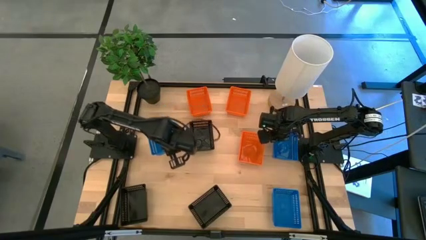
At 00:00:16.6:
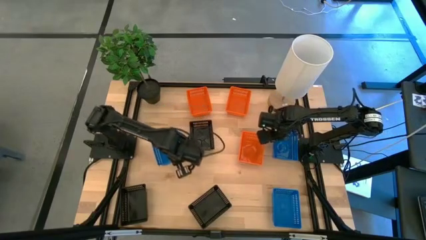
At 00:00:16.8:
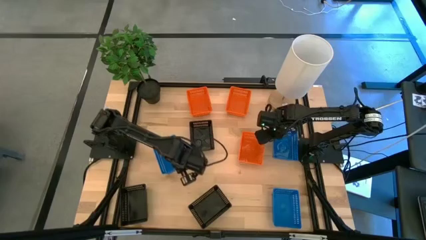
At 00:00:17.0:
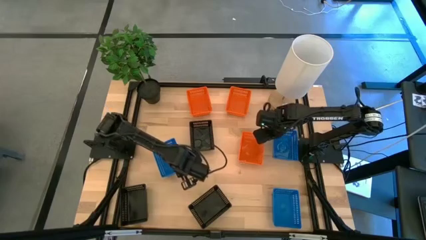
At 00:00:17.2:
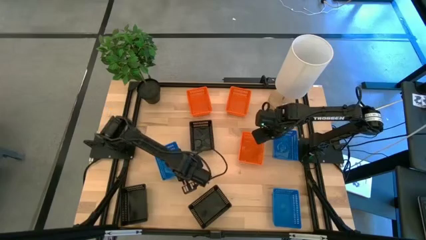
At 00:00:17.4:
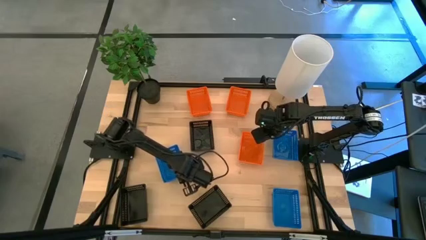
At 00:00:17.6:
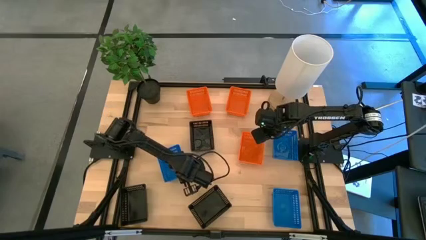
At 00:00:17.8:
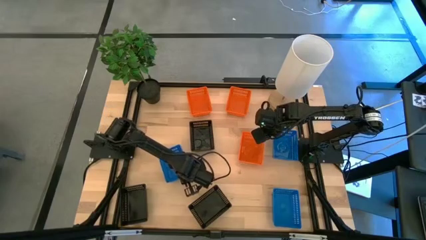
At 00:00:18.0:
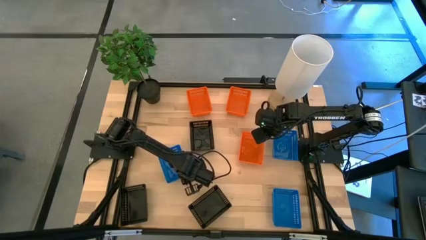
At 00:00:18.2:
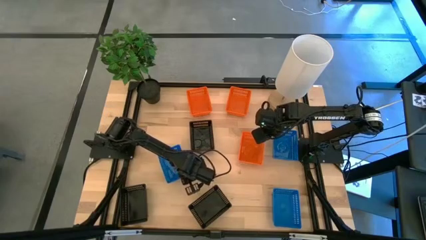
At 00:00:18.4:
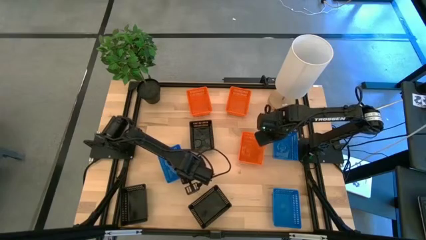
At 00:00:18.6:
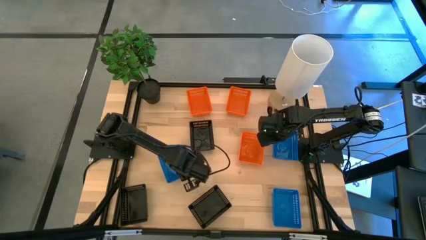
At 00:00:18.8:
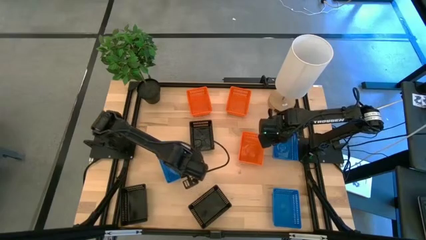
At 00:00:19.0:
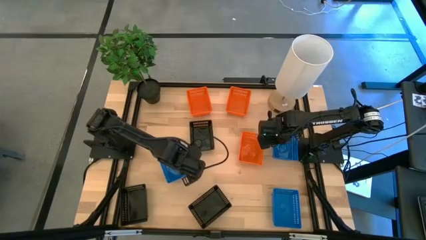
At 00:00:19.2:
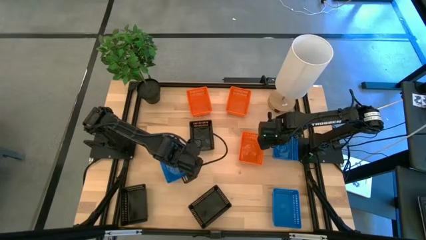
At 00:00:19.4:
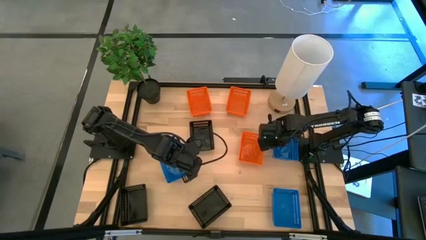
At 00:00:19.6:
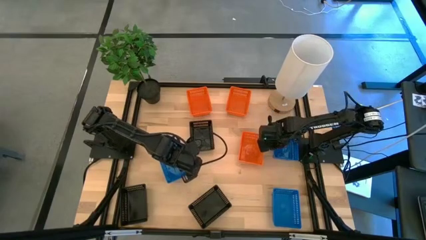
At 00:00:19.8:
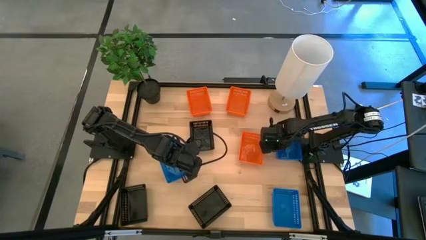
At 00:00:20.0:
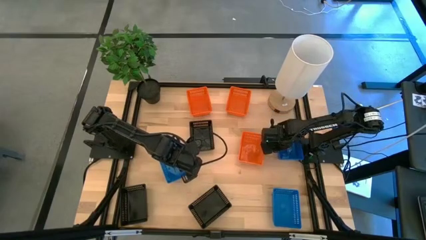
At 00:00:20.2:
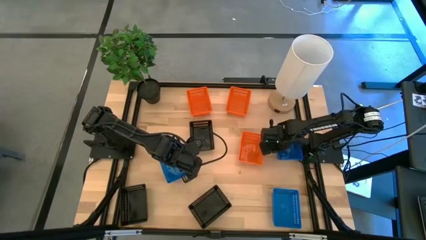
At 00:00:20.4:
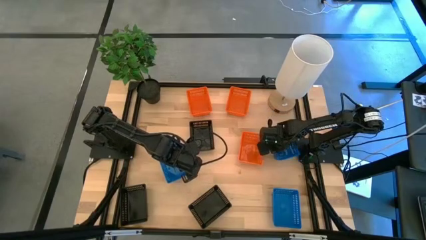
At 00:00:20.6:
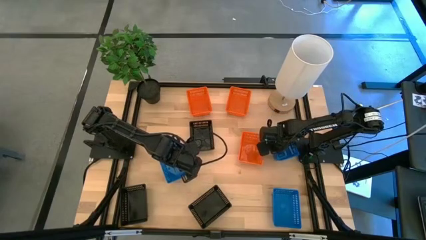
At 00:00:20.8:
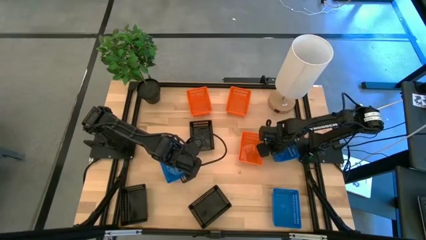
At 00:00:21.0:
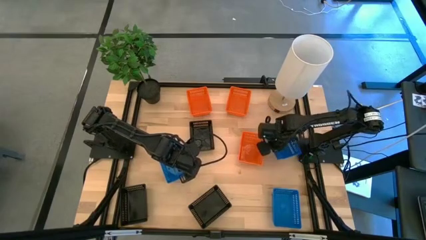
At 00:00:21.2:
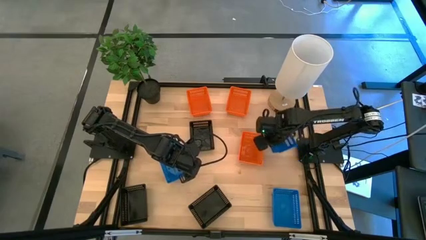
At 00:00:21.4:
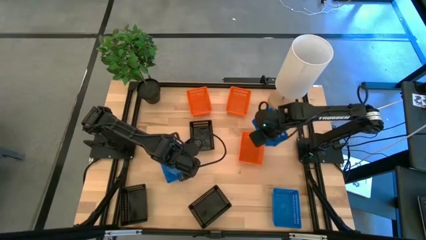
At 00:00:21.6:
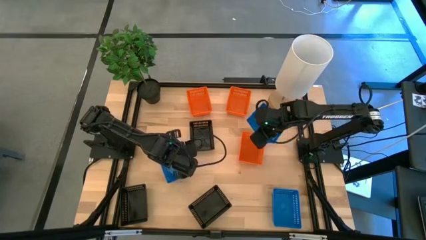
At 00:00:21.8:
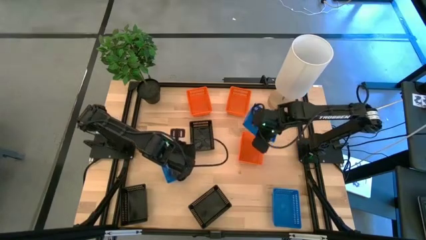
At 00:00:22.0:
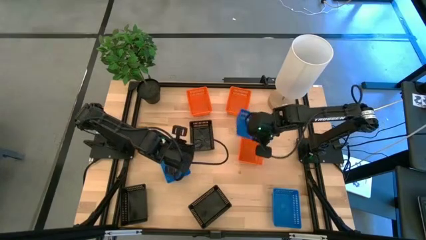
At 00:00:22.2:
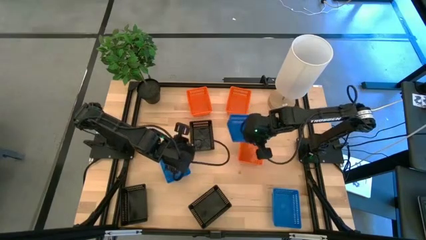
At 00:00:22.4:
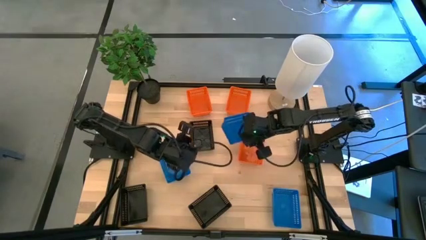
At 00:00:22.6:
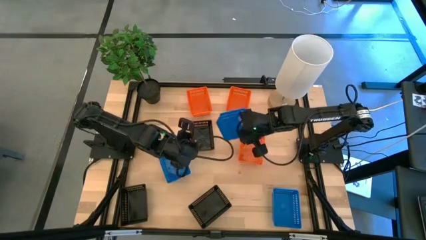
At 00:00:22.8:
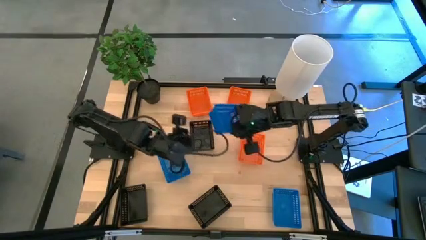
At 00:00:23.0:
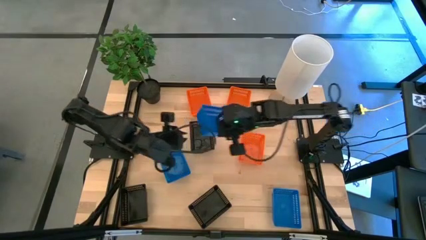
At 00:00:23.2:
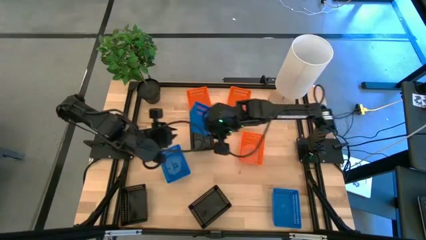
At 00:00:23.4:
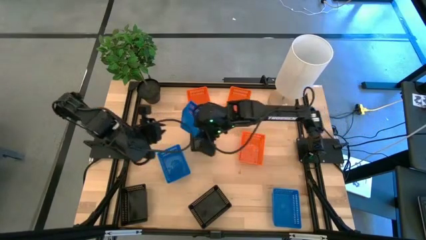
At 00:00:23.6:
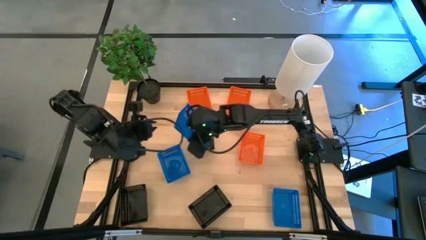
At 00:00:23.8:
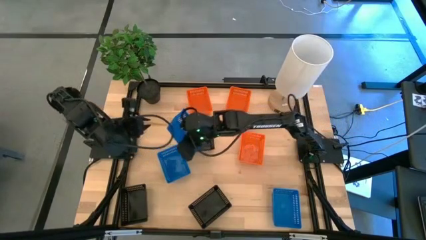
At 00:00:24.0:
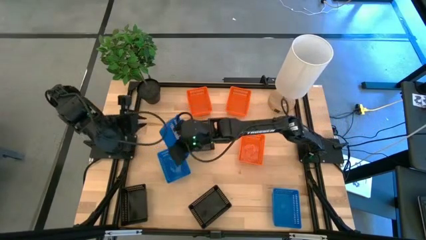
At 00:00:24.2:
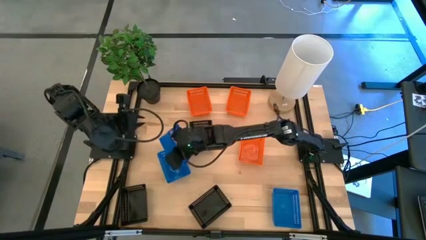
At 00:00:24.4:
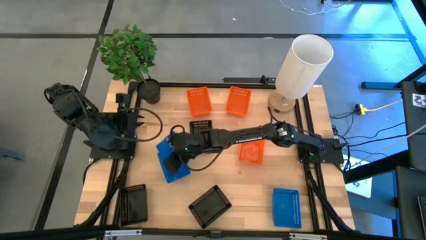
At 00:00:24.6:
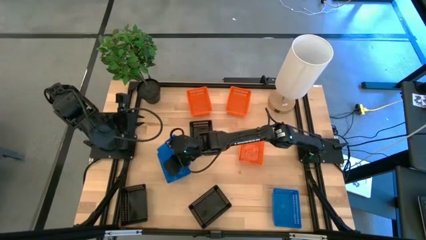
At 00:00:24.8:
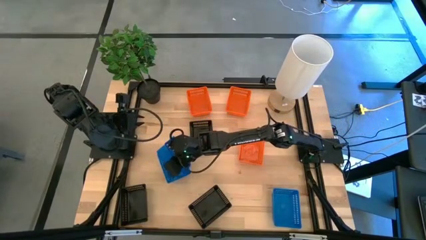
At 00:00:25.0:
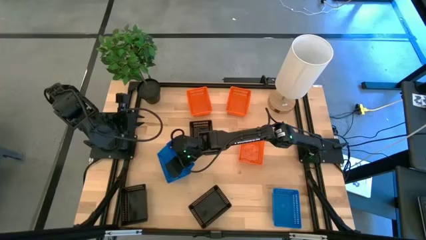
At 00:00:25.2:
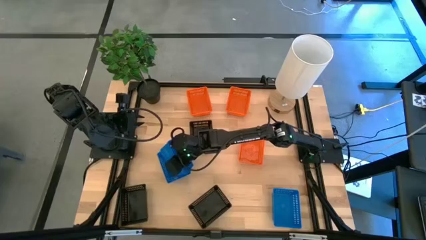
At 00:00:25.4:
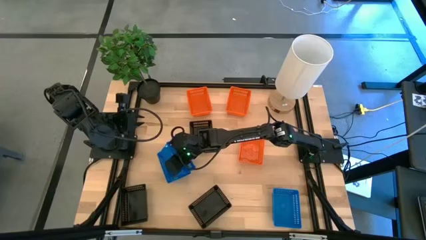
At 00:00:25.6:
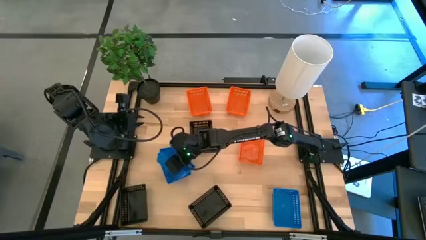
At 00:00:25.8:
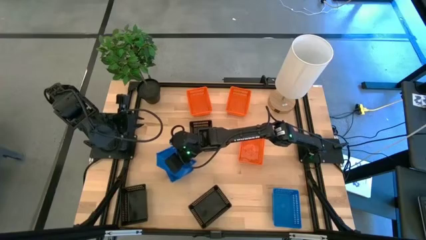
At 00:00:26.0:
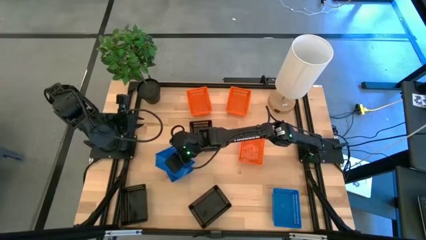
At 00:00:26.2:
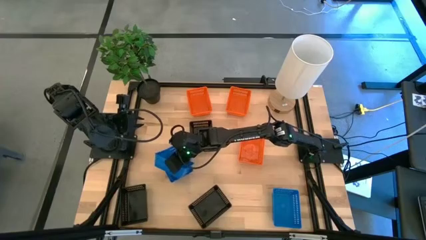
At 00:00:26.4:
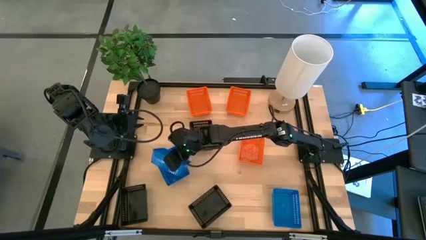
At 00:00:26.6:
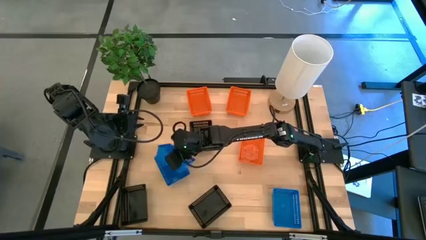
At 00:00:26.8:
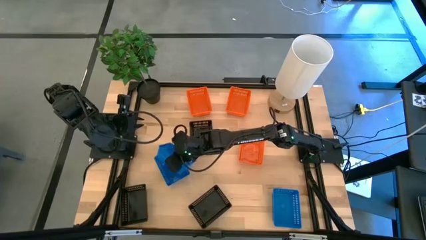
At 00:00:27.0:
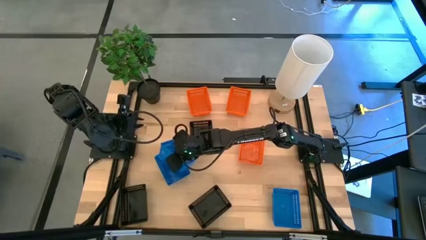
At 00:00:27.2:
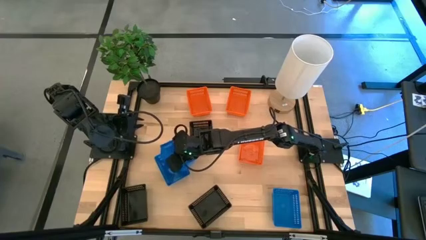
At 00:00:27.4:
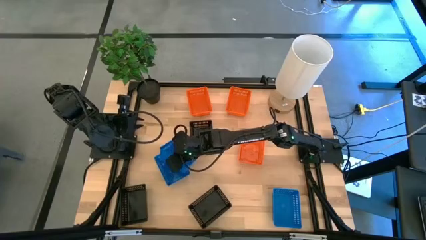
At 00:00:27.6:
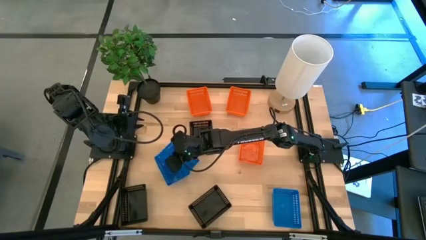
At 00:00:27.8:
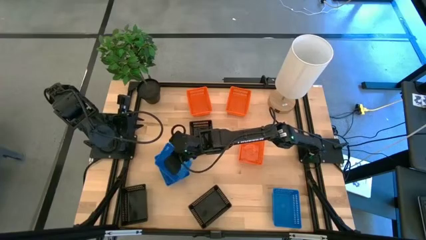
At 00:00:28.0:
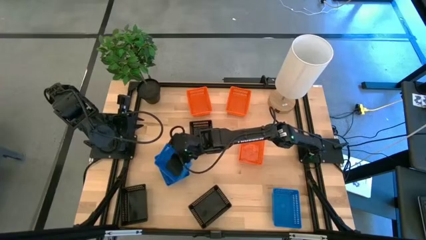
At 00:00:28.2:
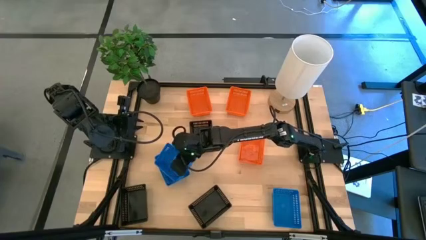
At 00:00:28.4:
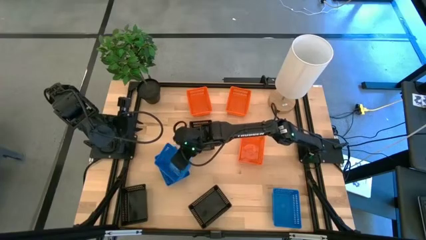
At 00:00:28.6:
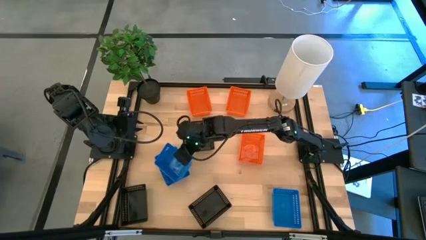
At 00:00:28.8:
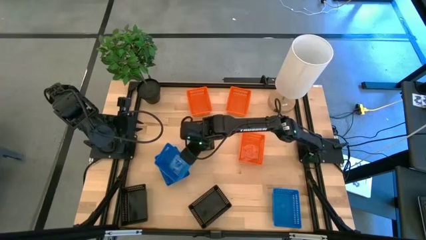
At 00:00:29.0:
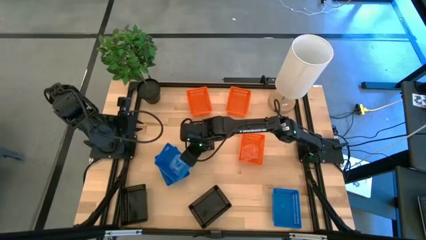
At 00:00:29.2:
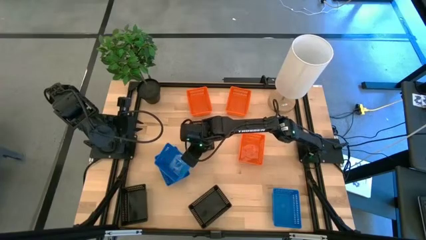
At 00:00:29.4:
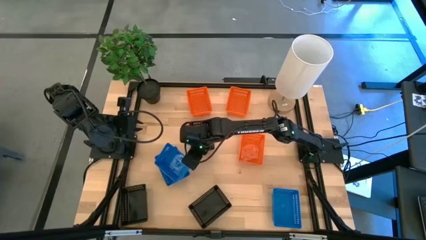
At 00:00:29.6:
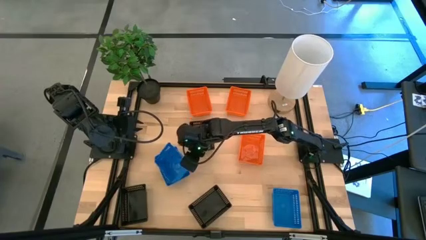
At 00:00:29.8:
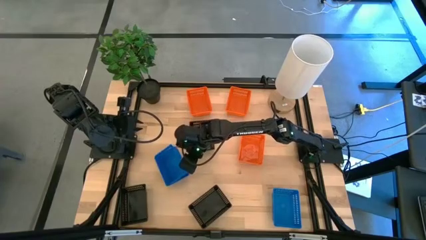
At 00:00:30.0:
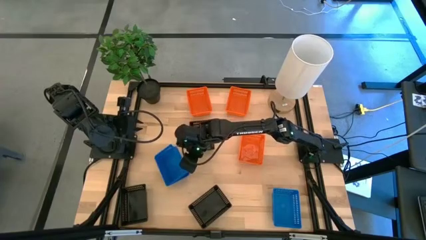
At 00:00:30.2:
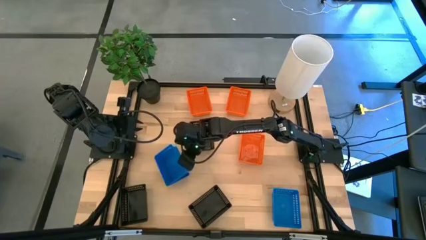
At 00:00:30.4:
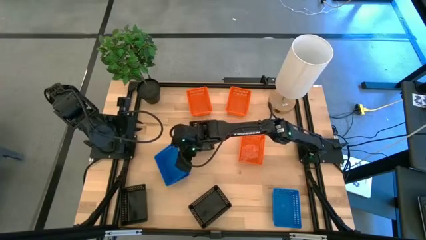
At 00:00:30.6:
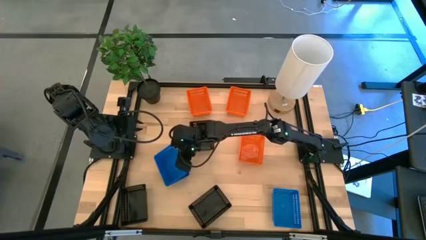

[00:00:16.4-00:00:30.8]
Stack the top right blue bin on top of the top left blue bin
